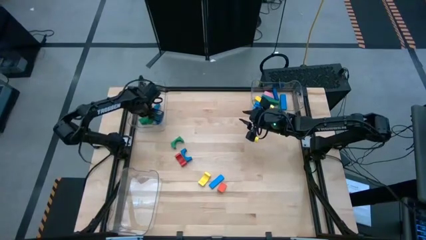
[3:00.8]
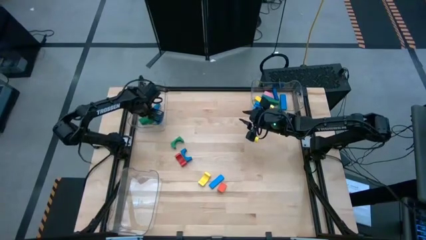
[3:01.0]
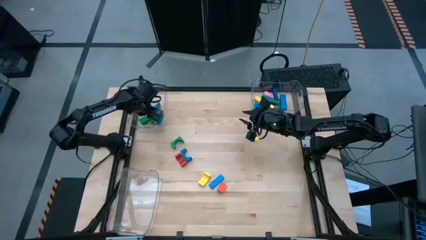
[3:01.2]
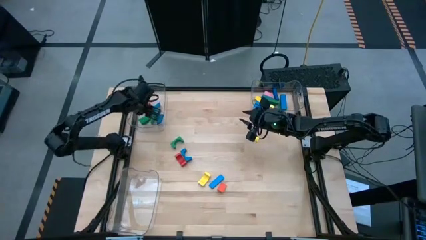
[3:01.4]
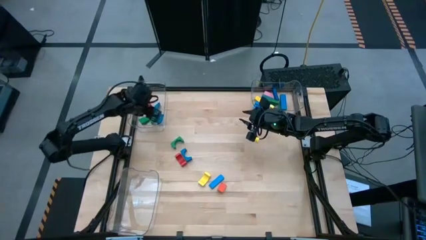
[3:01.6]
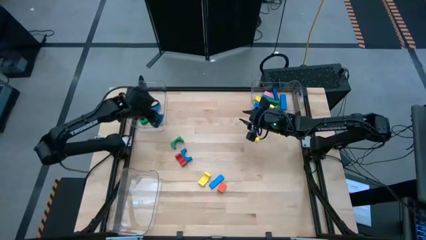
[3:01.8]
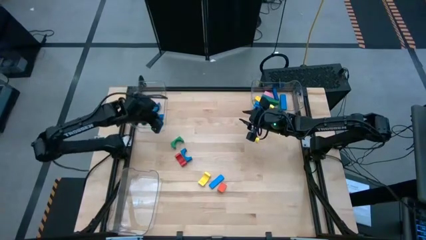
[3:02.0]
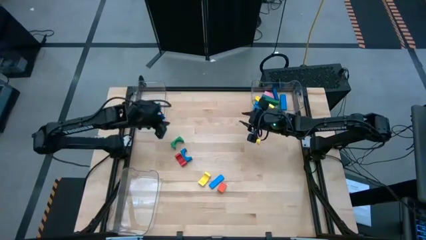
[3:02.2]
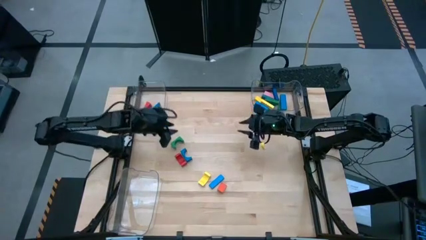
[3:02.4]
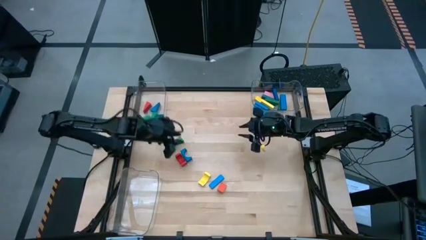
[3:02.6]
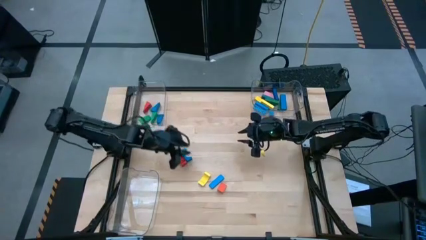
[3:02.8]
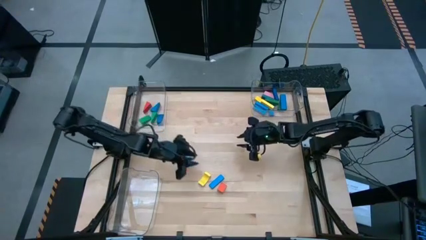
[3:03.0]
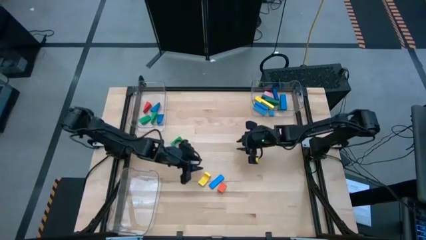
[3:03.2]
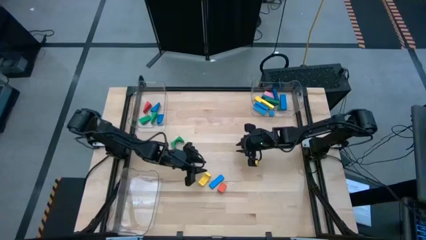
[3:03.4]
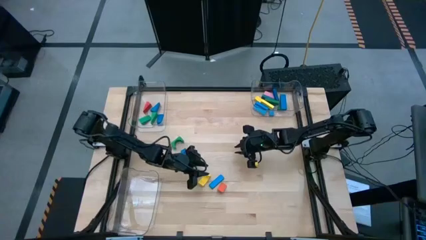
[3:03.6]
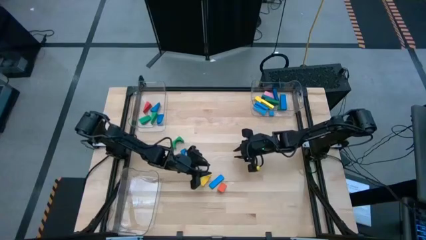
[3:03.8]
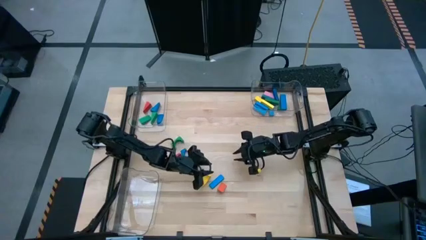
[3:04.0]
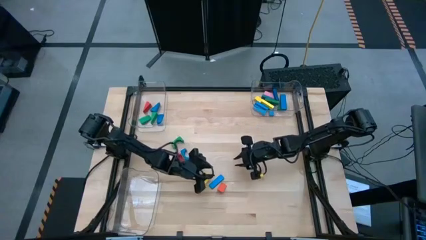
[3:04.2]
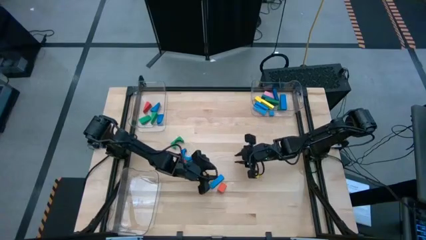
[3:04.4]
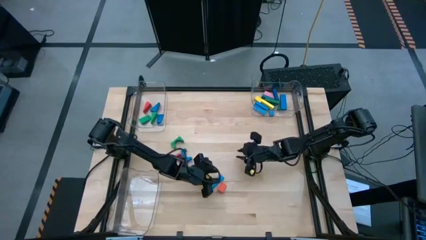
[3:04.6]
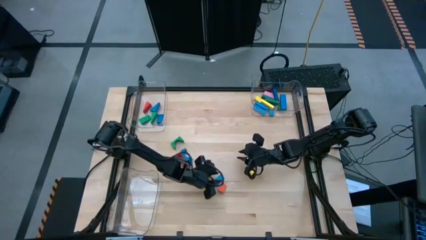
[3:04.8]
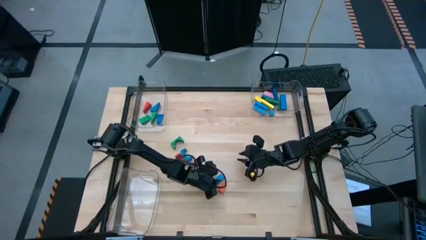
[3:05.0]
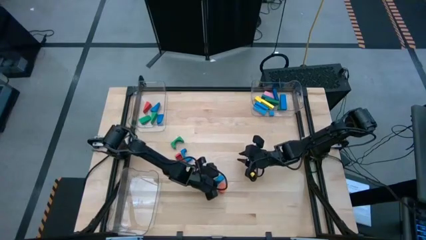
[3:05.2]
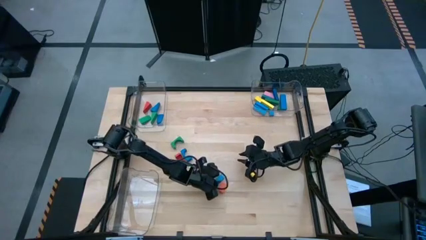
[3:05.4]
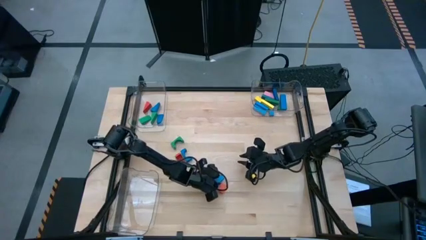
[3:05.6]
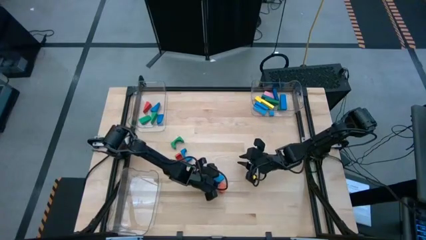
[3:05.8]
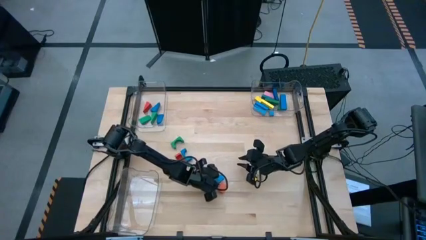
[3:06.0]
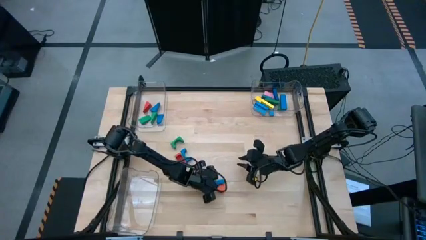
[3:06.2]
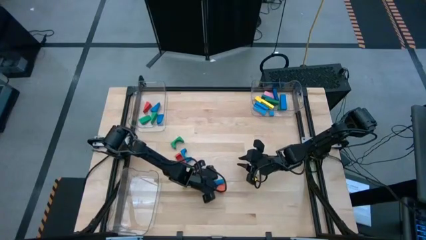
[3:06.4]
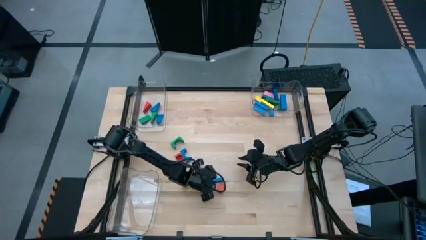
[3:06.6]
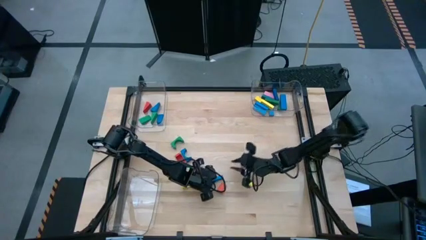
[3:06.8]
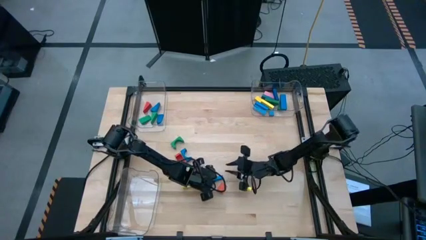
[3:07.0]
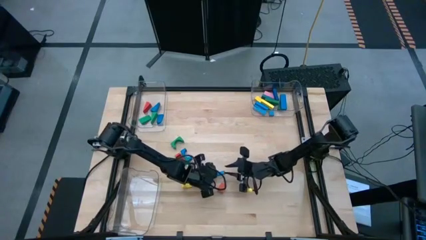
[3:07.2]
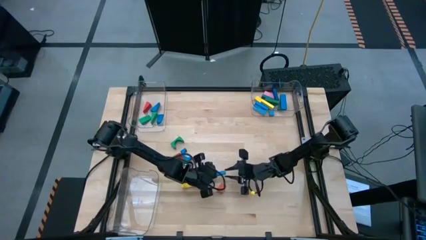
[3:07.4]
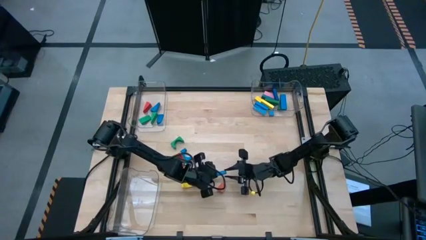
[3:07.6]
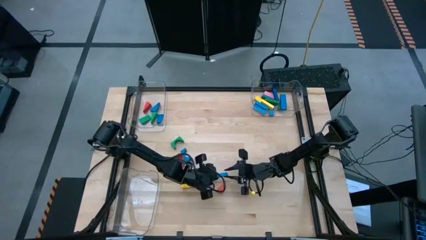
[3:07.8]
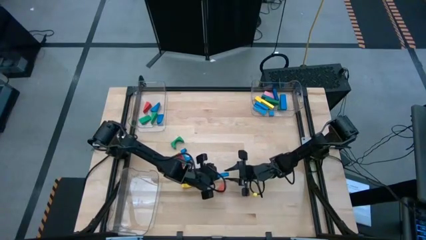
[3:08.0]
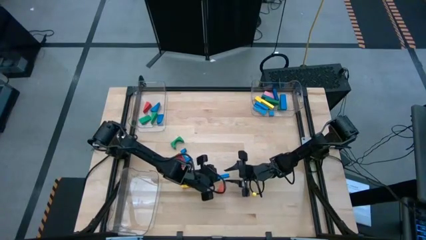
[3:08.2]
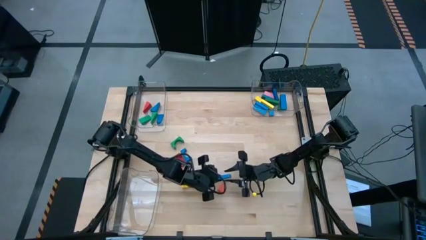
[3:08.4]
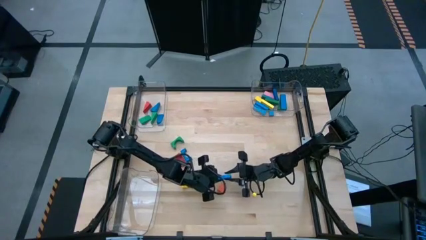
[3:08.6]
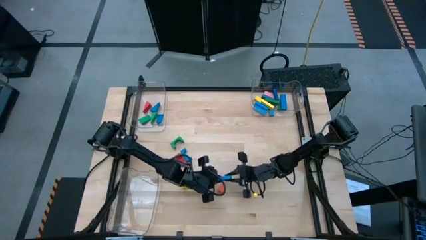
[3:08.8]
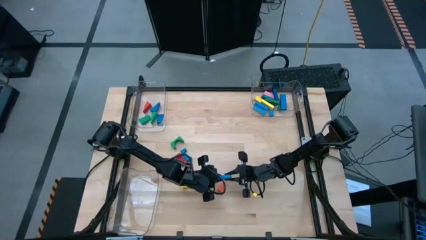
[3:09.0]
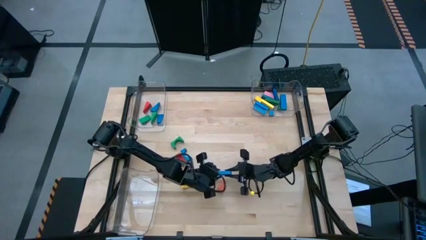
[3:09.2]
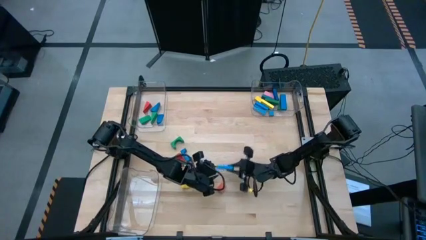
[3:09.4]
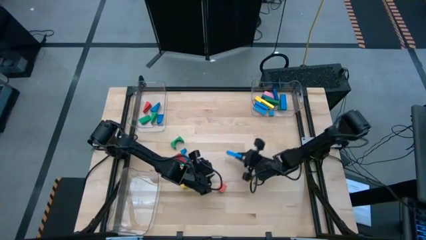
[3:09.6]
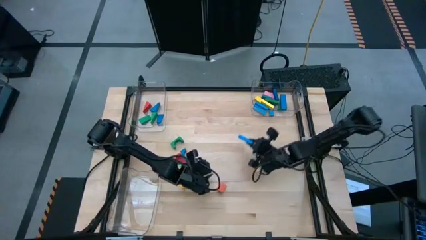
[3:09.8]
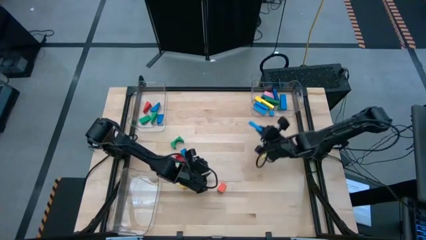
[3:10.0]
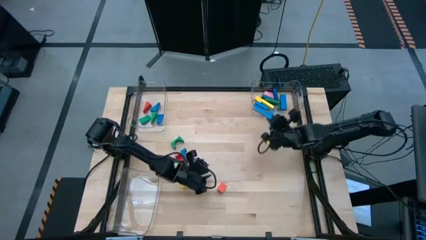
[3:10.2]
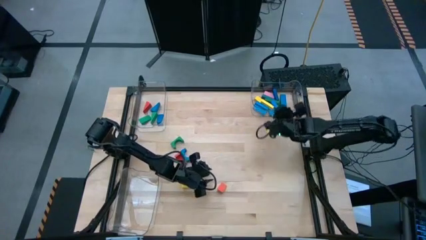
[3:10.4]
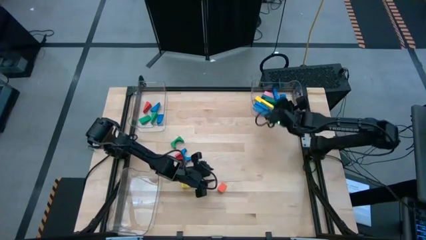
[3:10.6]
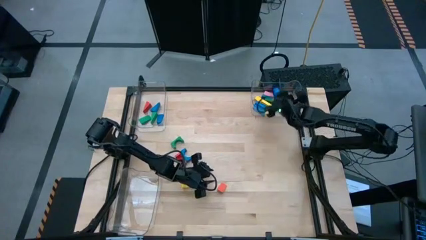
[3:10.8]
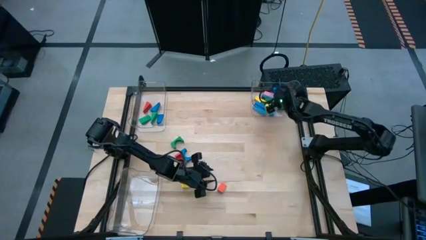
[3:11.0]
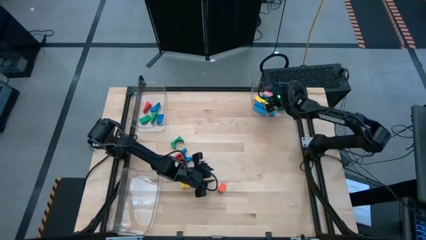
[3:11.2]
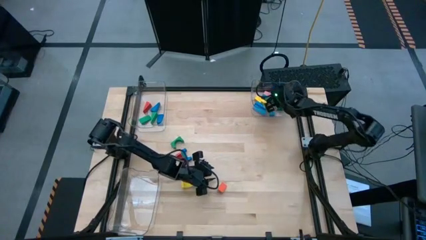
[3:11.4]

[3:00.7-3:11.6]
Task: Sort blocks by size
Put the blue rectangular block into the top right transparent bin

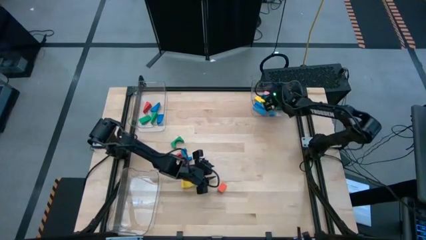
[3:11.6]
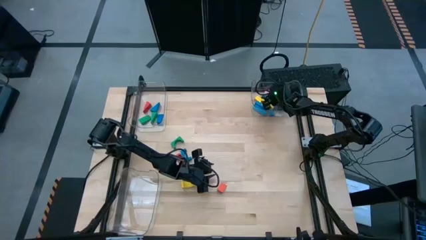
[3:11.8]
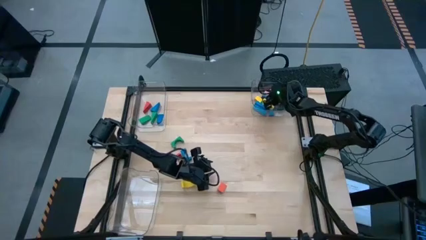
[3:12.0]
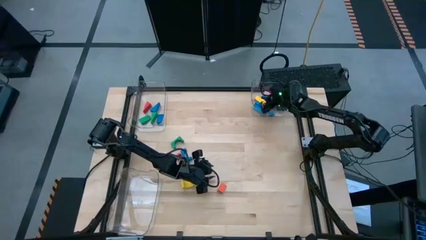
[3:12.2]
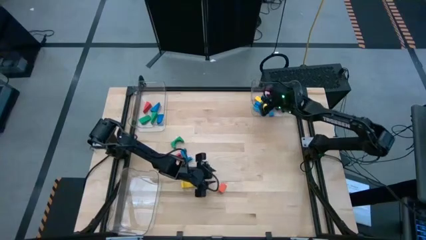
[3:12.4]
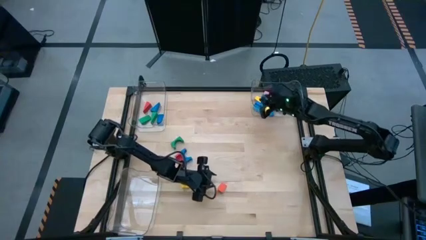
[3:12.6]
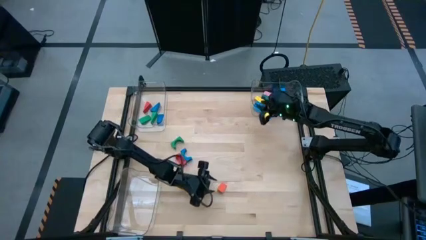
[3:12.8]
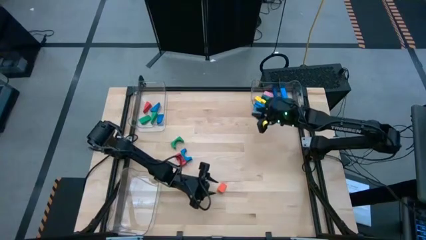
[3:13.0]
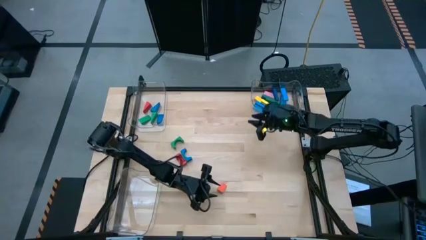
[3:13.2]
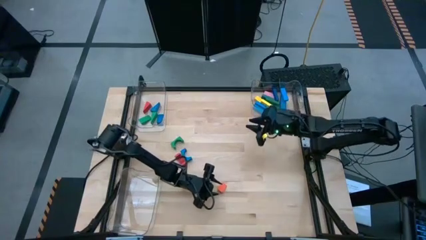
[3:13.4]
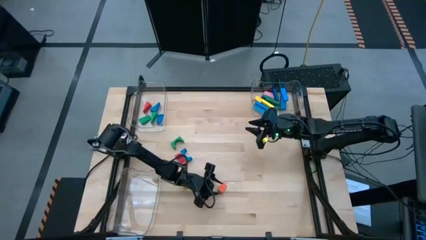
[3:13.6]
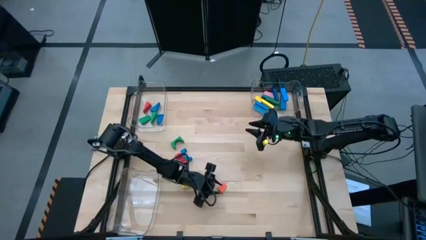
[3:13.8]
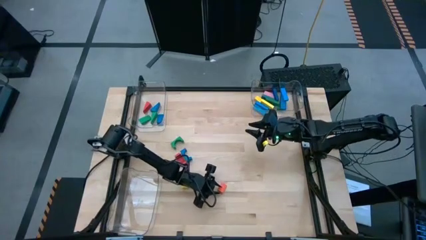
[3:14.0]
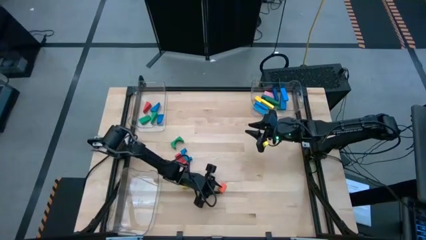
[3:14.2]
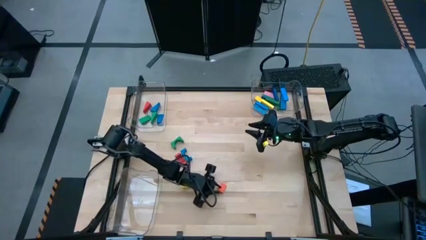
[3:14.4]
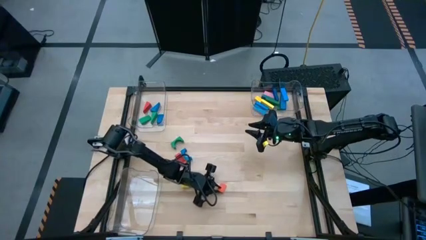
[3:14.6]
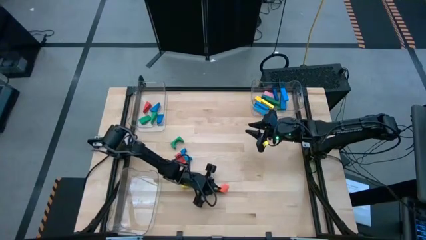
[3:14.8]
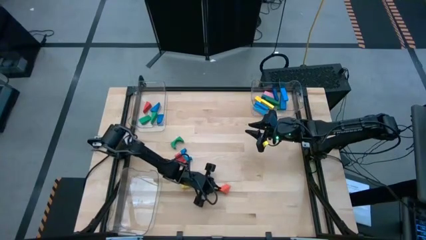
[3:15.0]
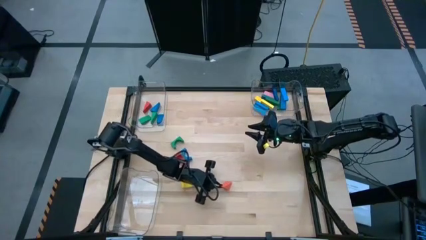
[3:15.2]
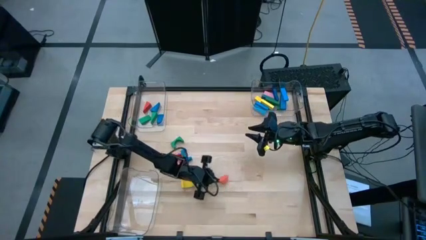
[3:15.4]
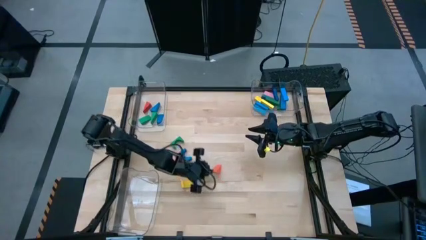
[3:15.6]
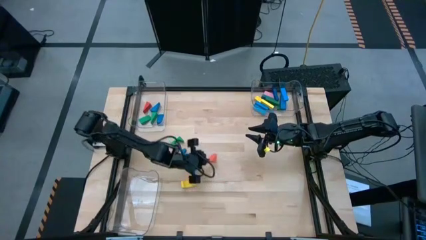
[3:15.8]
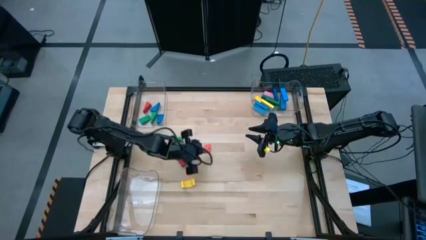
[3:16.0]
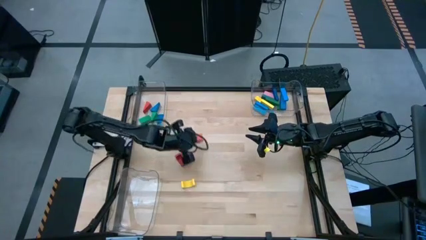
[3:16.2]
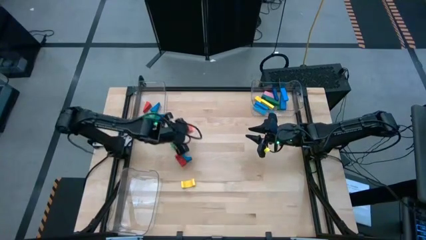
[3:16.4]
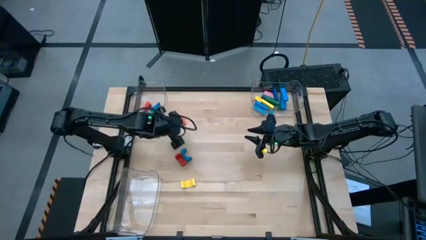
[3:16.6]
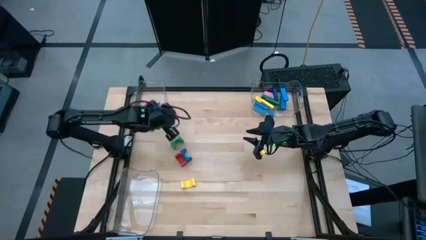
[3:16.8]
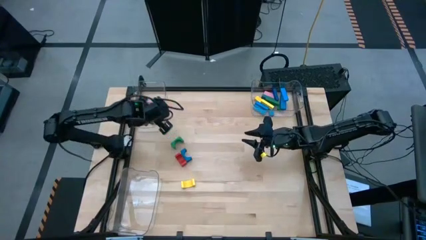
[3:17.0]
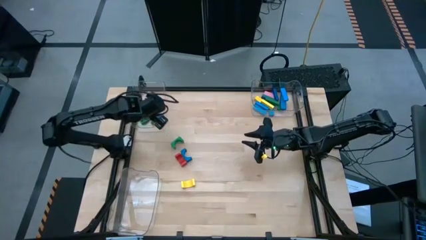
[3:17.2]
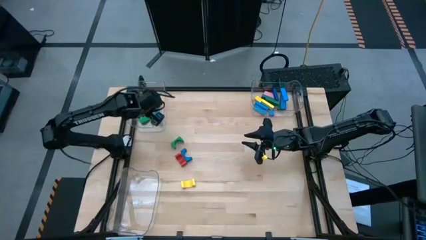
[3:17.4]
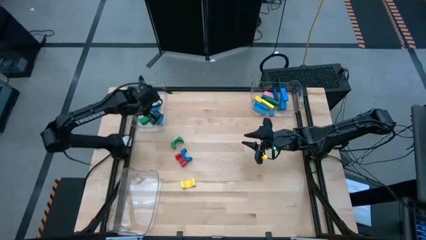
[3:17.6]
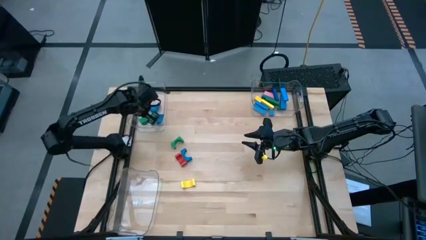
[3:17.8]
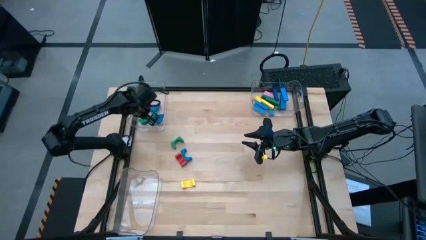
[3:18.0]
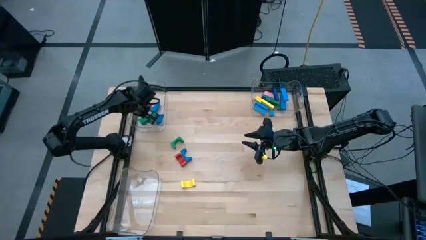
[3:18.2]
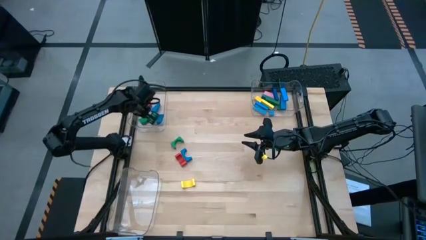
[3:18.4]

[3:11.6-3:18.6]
Put the orange triangle block into the top left transparent bin
